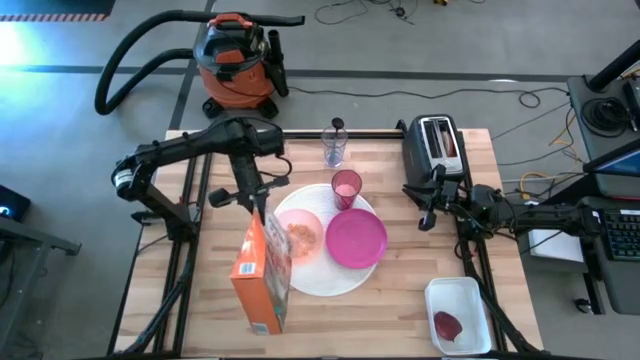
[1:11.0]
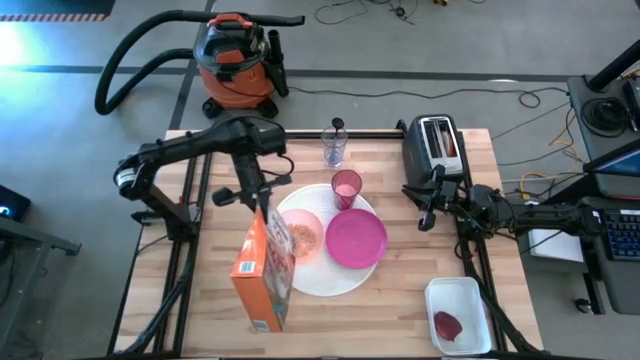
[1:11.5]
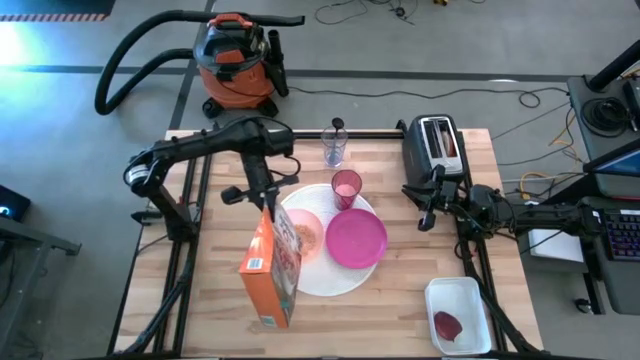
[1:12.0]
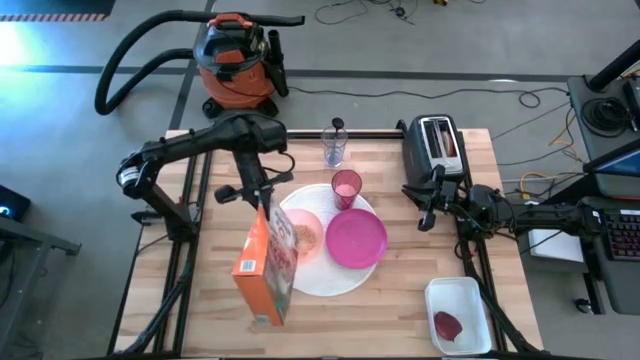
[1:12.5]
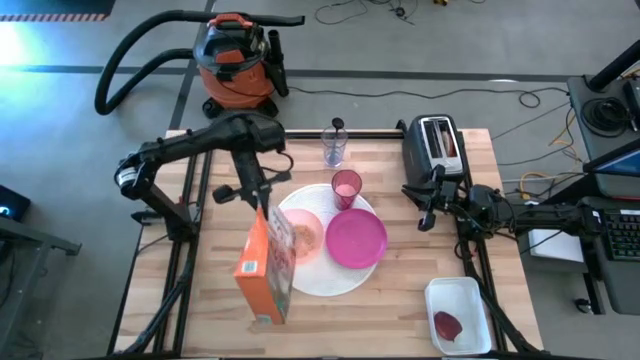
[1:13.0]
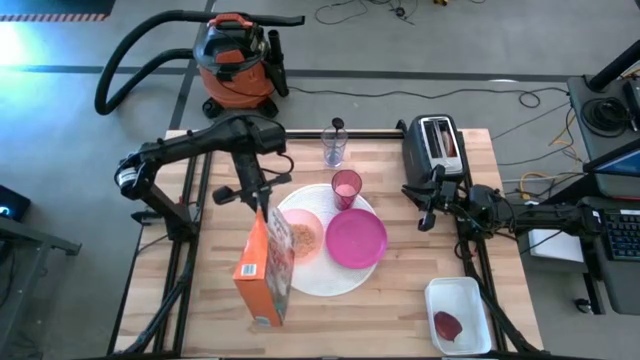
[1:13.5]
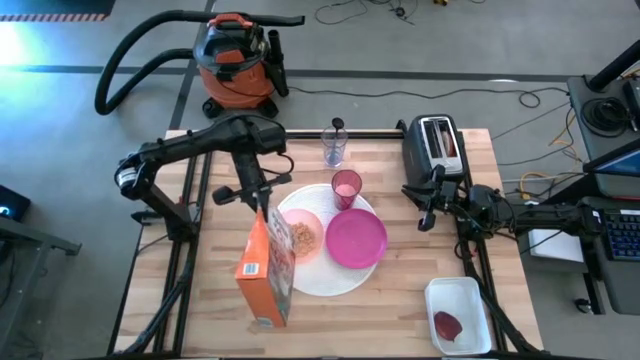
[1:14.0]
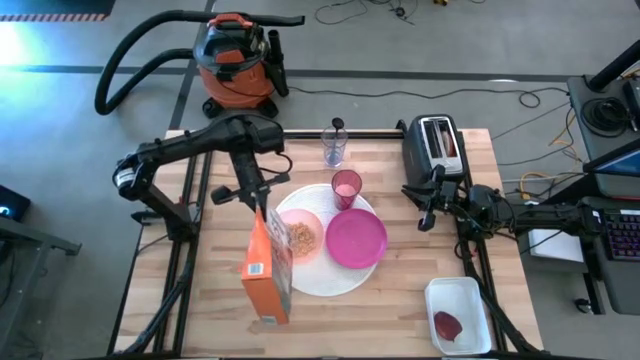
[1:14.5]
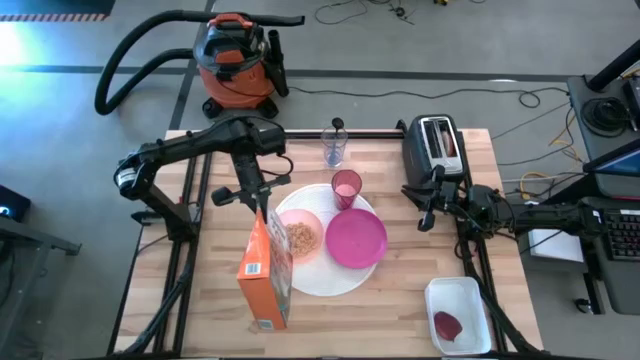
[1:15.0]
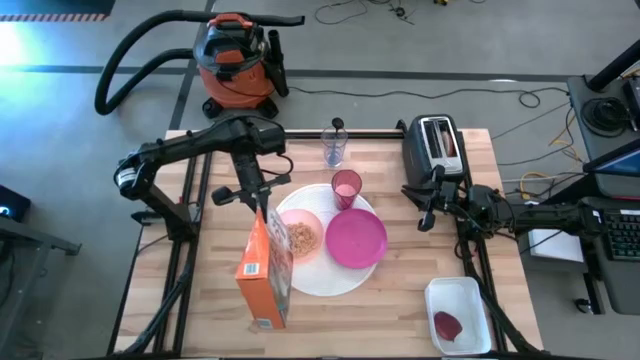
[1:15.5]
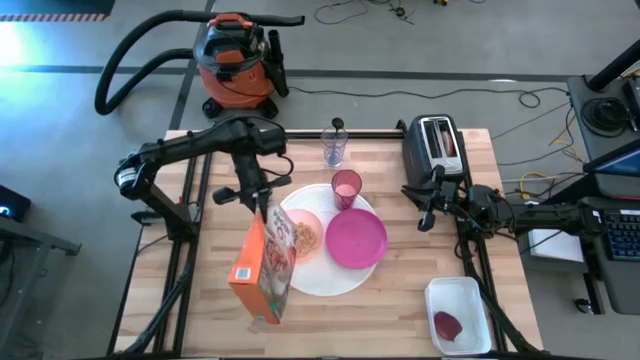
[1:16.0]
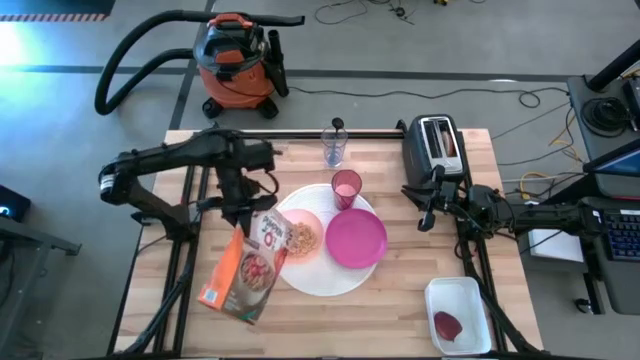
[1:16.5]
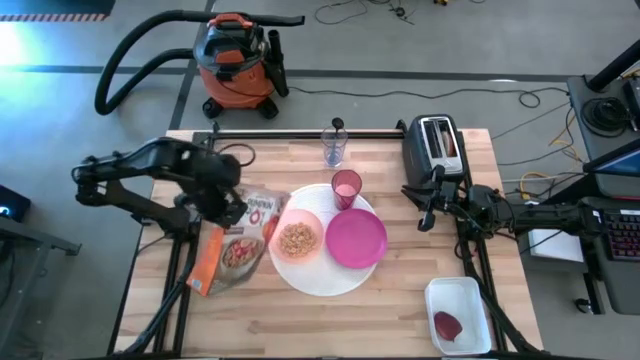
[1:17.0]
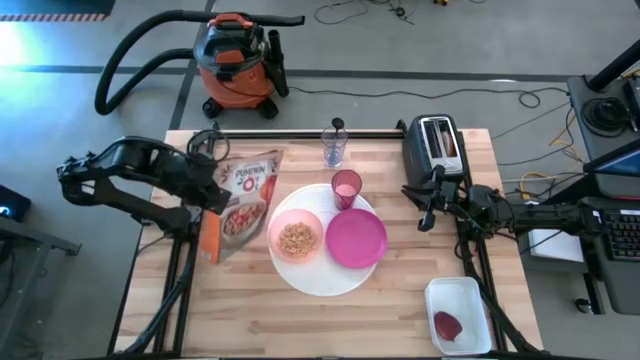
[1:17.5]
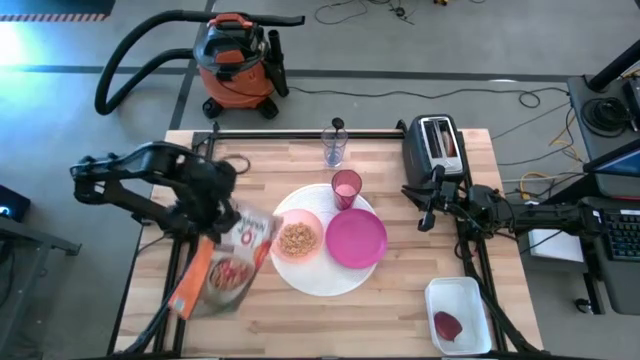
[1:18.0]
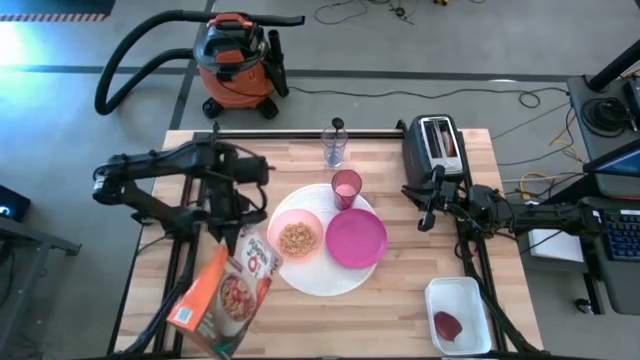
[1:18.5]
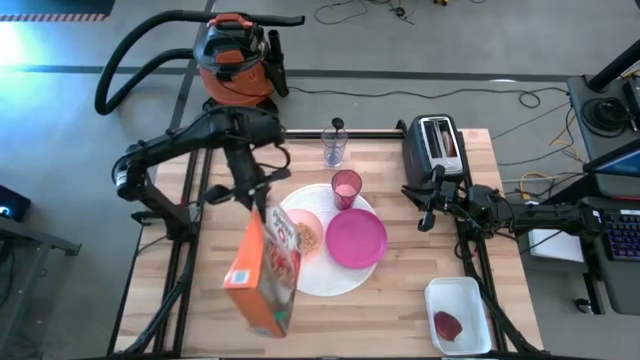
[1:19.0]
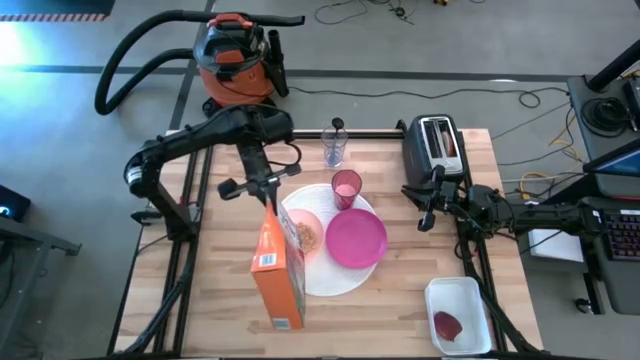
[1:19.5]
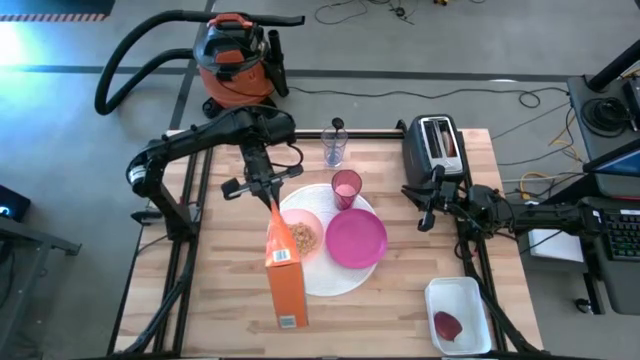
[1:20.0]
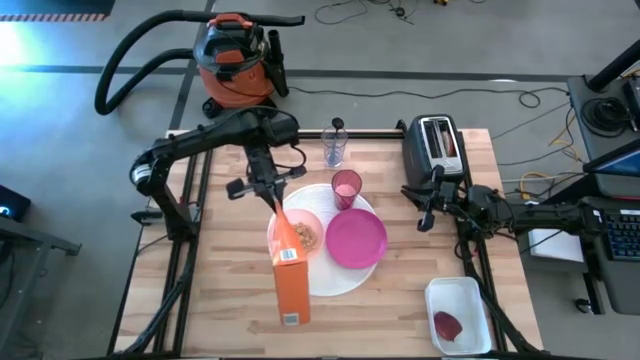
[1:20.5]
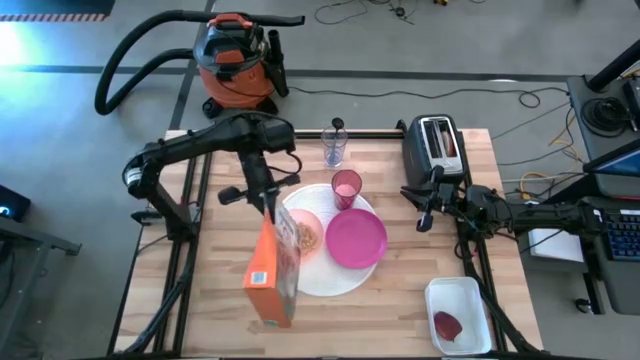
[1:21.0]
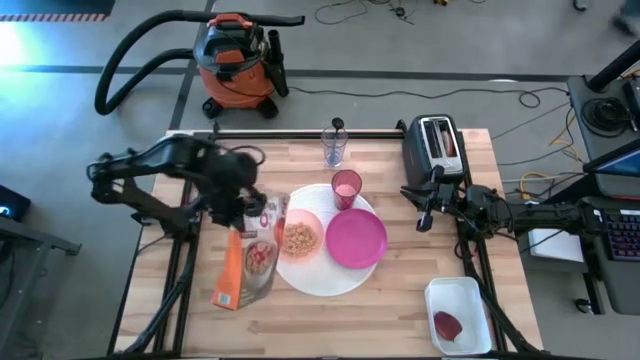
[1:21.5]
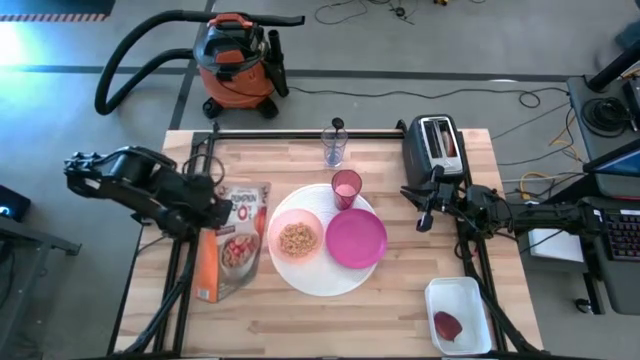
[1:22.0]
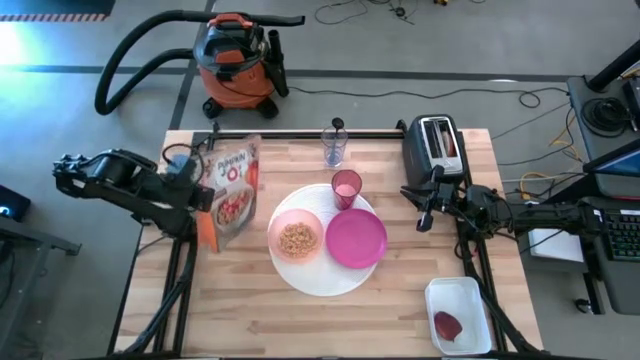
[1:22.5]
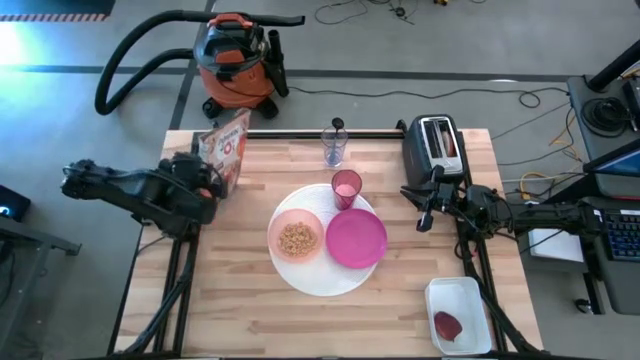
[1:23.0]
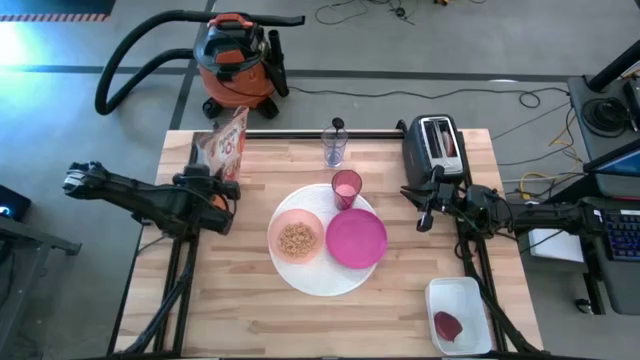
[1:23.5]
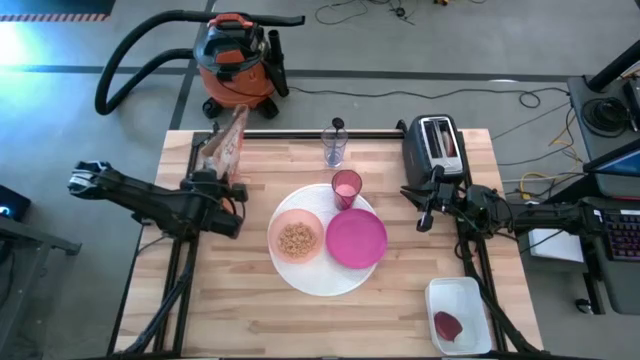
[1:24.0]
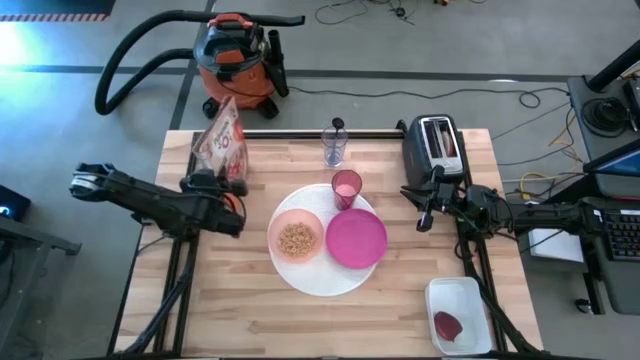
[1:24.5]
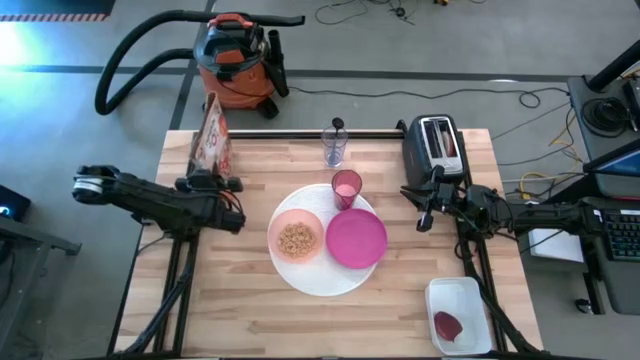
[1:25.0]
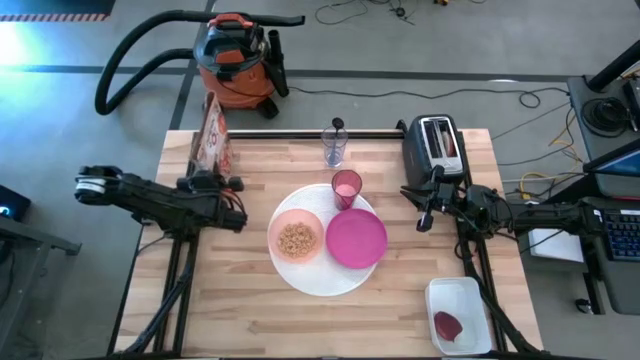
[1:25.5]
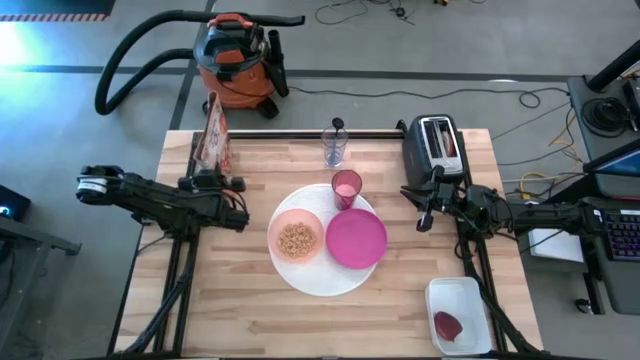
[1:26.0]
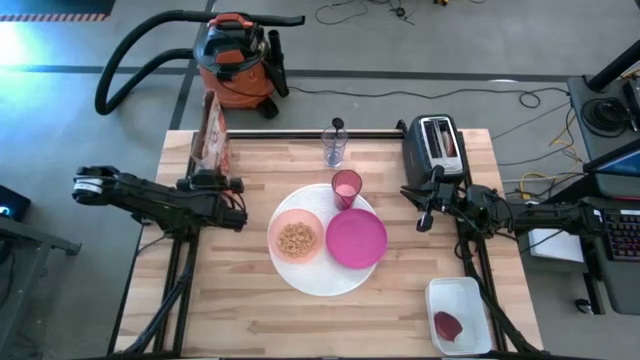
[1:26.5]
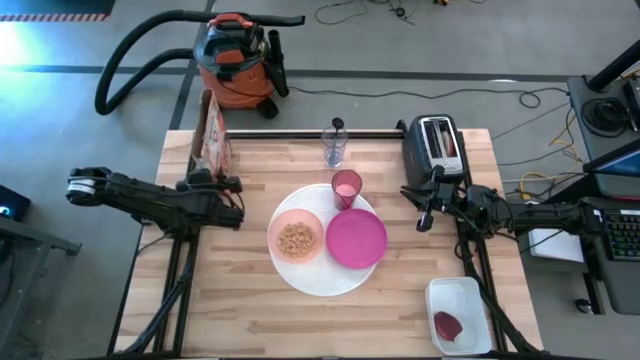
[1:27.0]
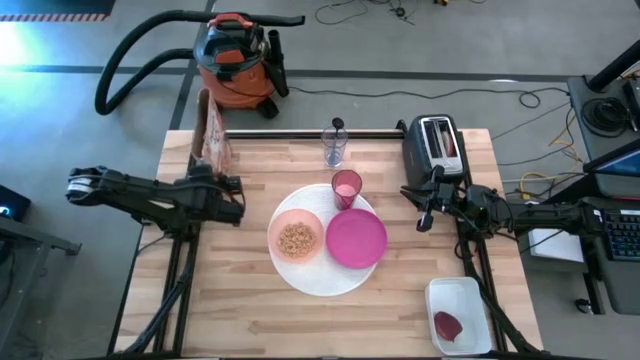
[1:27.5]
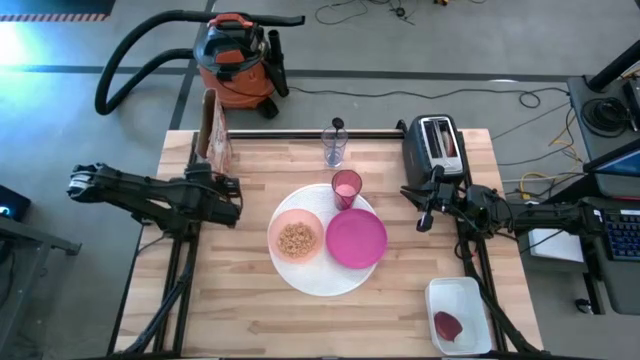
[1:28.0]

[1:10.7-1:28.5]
Task: Arrange a breakfast setting
Pour the cereal from the cereal box into the orange bowl

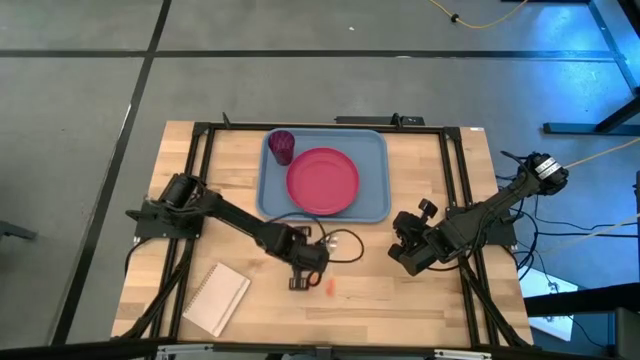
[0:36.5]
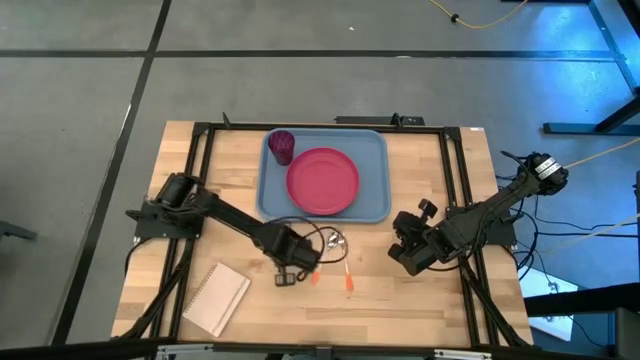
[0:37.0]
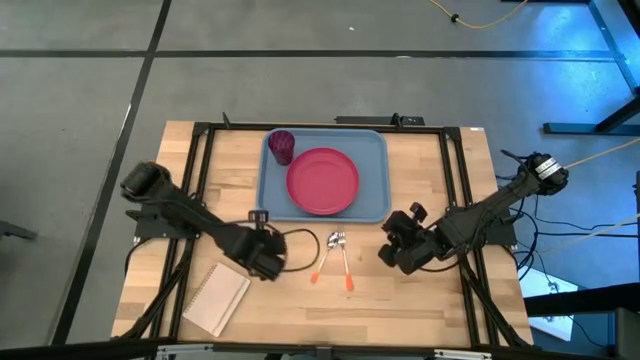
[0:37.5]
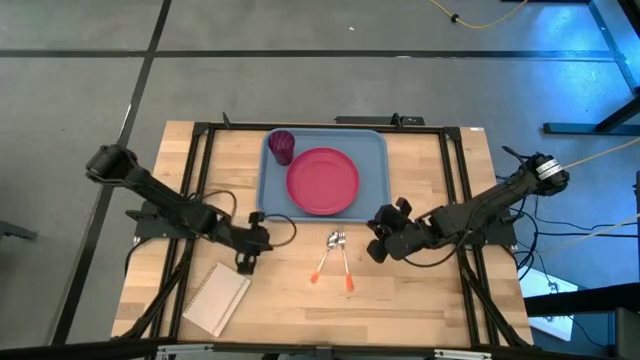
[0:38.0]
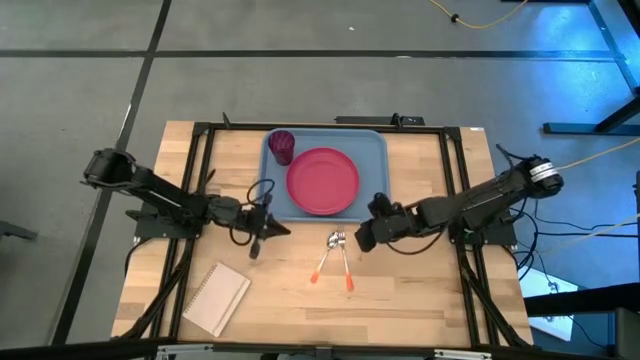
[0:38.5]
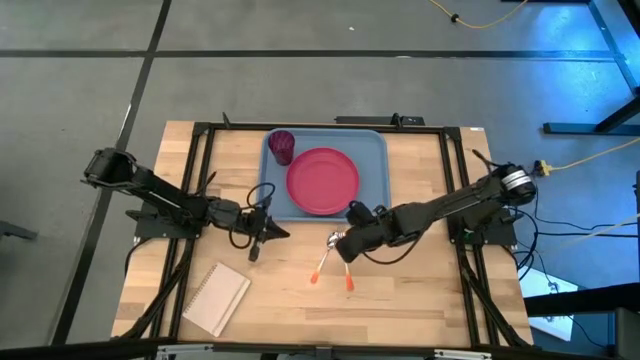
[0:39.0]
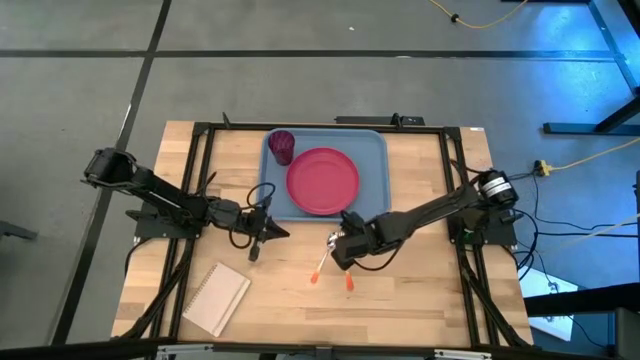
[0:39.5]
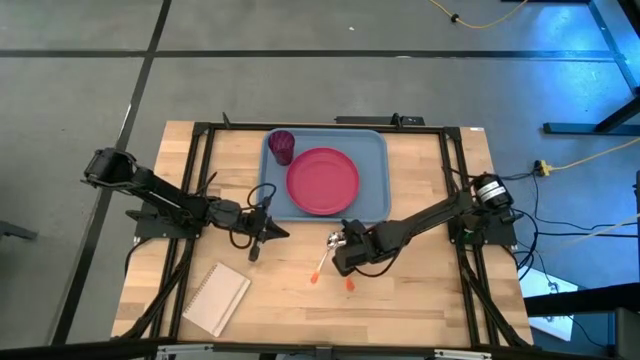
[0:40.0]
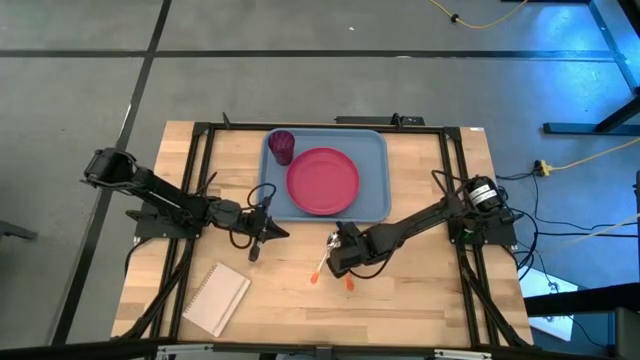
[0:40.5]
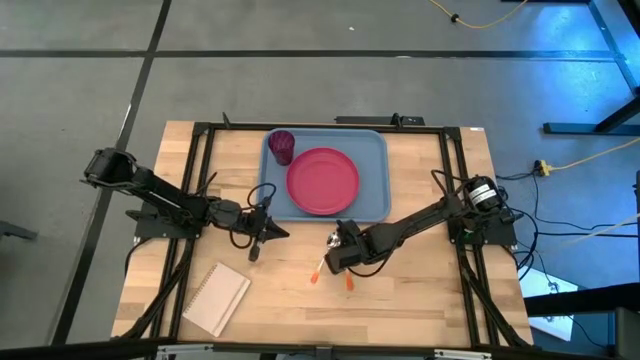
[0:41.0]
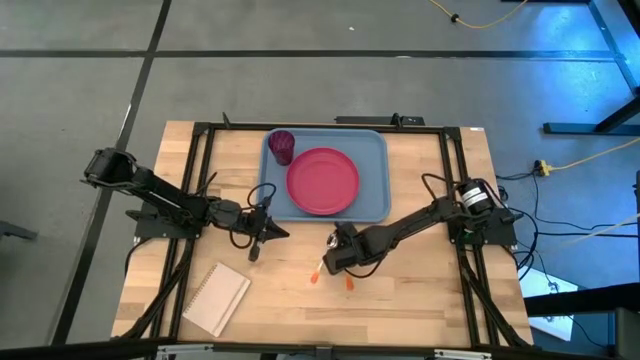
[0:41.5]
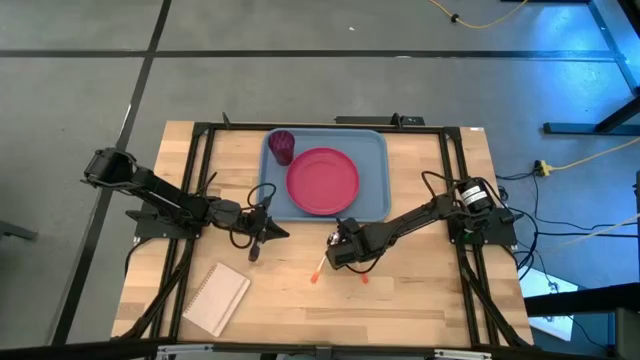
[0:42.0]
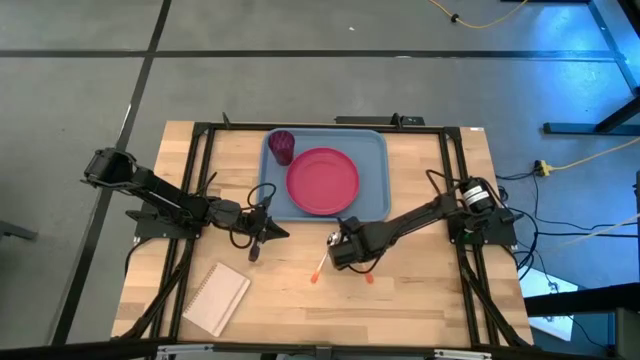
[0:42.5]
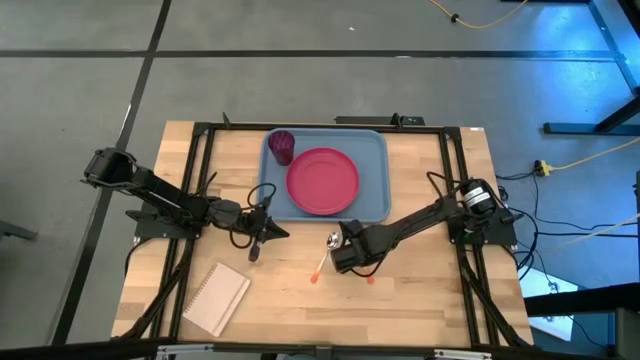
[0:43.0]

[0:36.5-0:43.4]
Task: Pick and place plate/cup/fork/spoon on tray
Put the orange fork on the blue serving tray to the right of the pink plate
